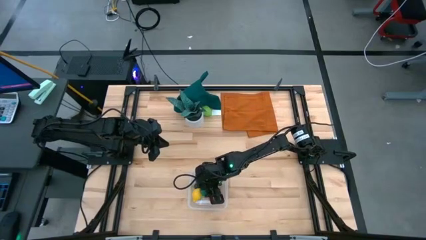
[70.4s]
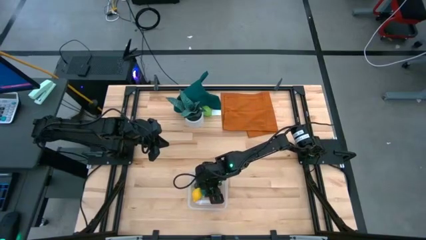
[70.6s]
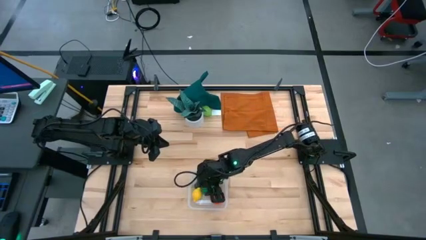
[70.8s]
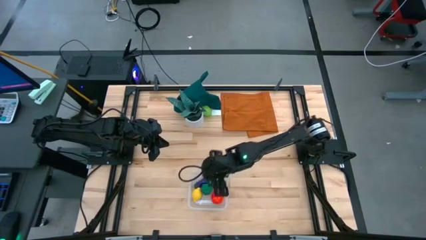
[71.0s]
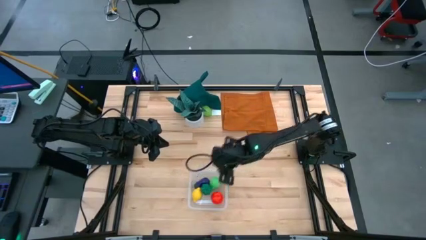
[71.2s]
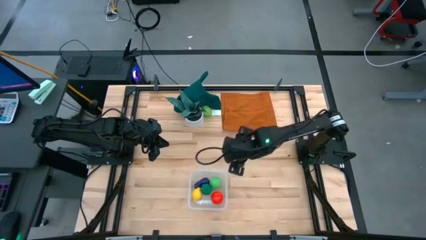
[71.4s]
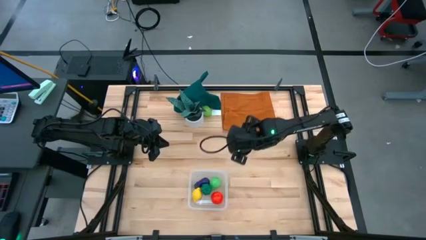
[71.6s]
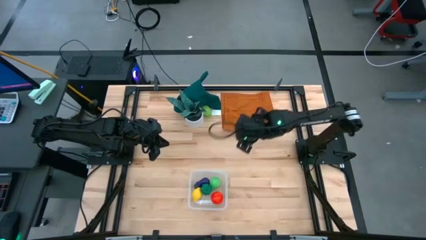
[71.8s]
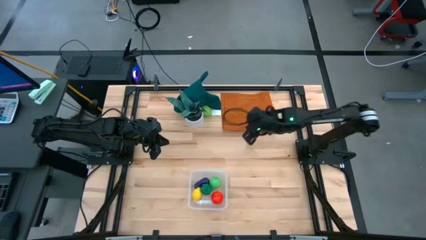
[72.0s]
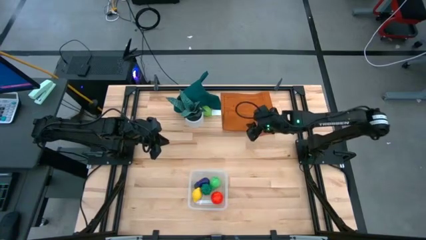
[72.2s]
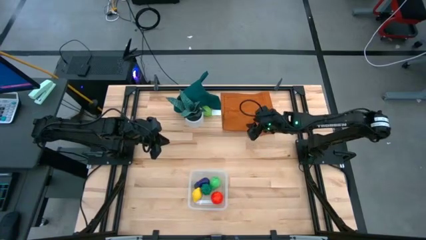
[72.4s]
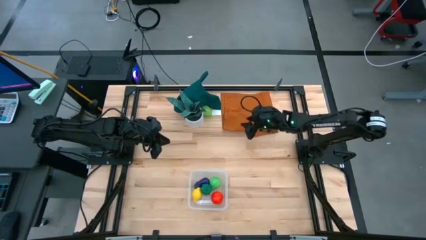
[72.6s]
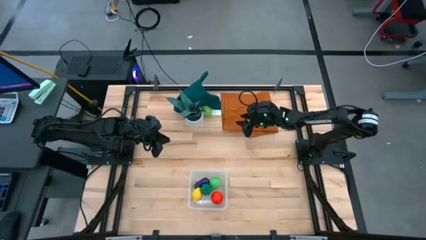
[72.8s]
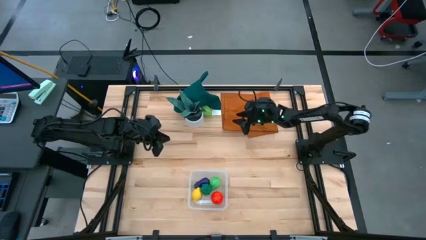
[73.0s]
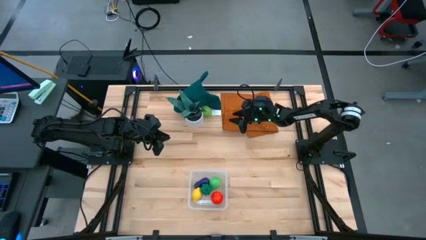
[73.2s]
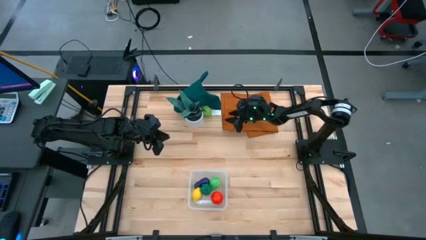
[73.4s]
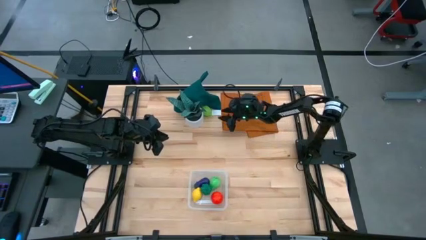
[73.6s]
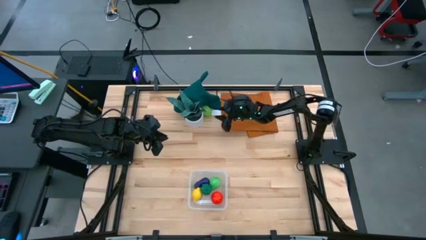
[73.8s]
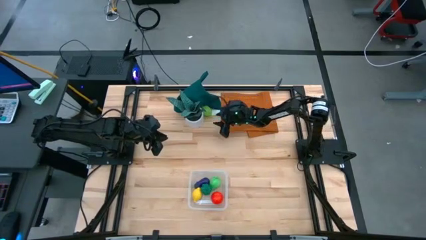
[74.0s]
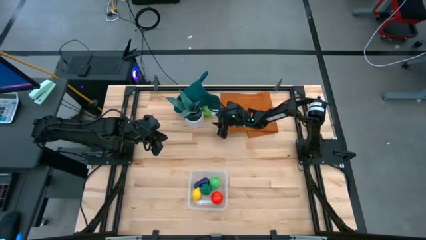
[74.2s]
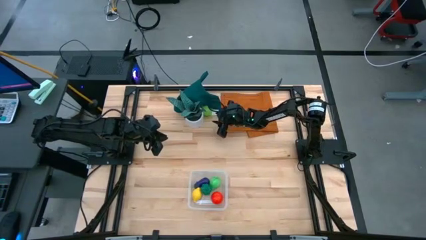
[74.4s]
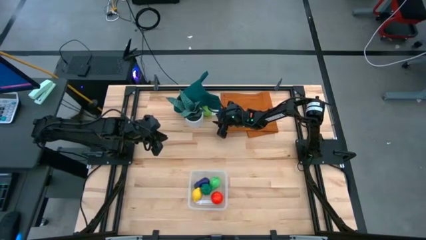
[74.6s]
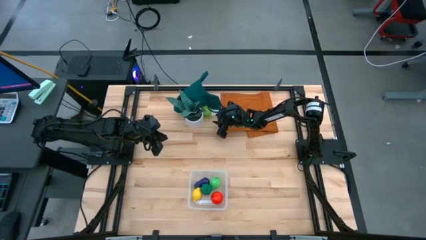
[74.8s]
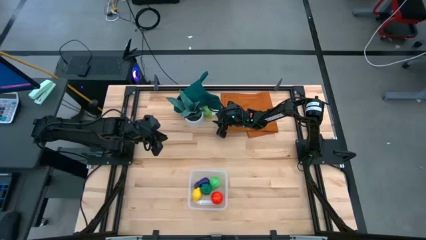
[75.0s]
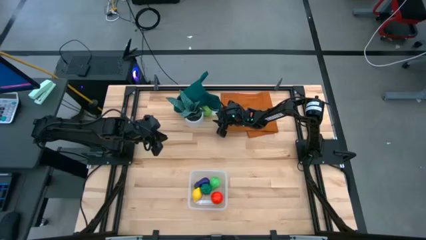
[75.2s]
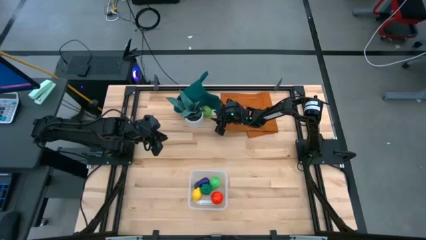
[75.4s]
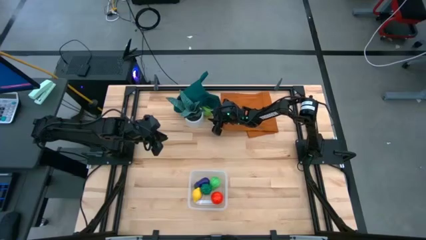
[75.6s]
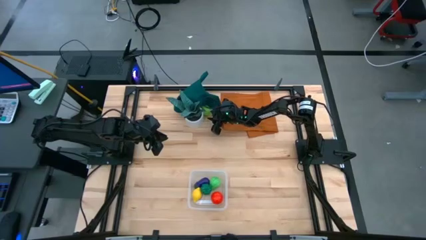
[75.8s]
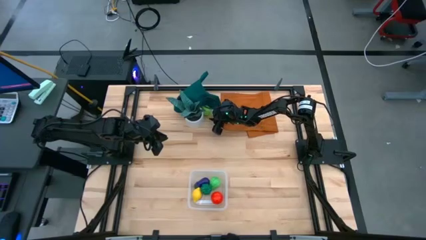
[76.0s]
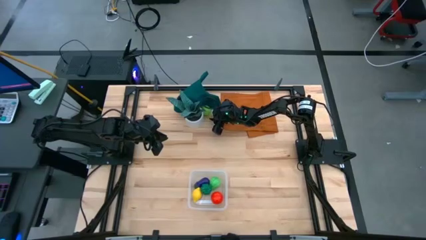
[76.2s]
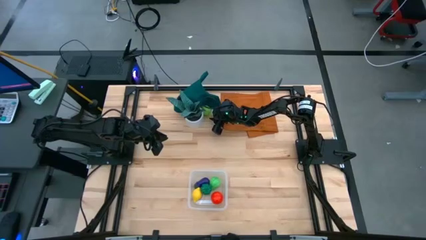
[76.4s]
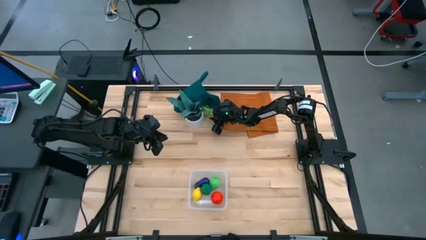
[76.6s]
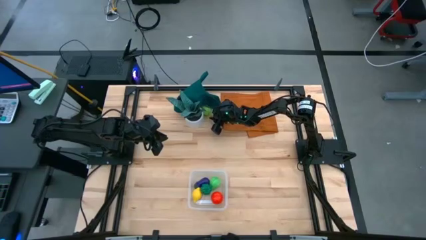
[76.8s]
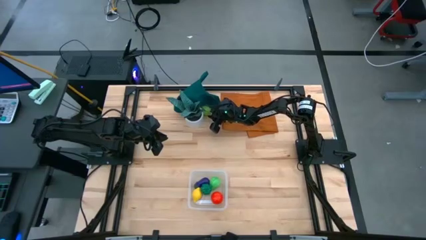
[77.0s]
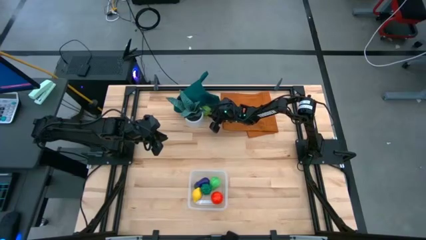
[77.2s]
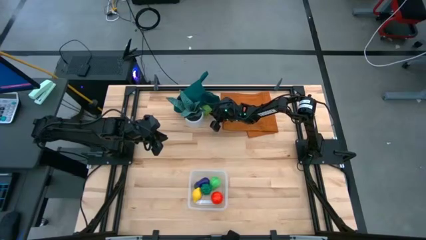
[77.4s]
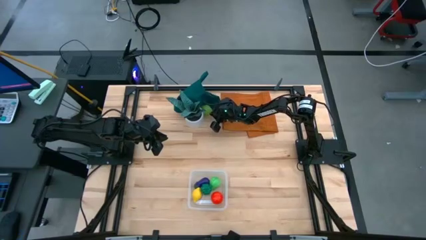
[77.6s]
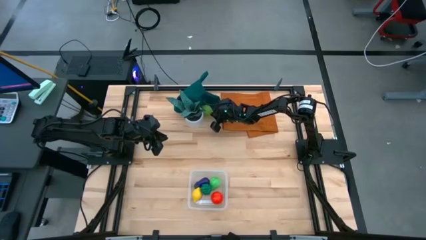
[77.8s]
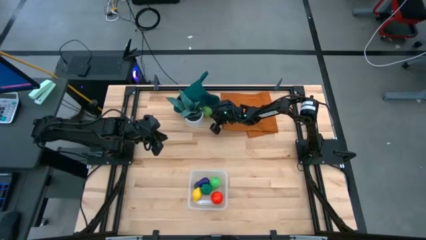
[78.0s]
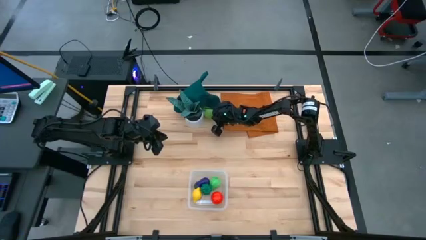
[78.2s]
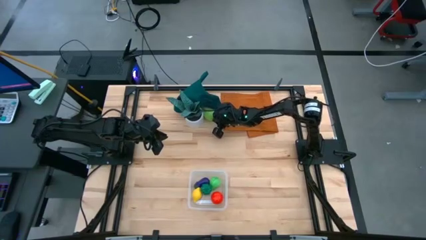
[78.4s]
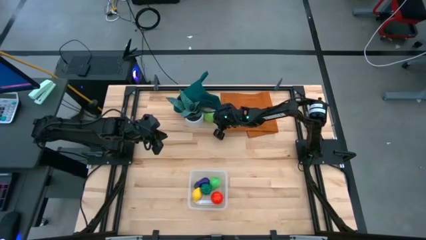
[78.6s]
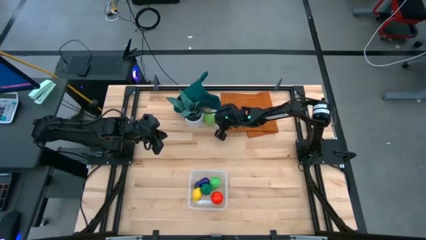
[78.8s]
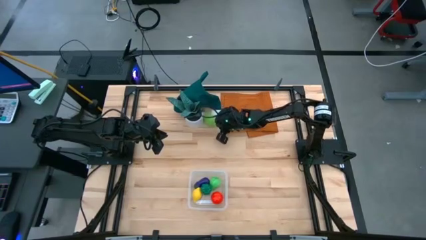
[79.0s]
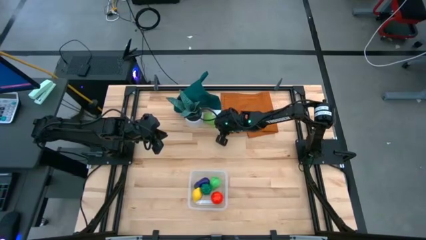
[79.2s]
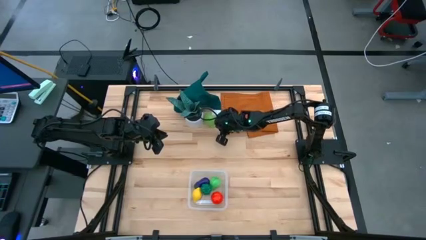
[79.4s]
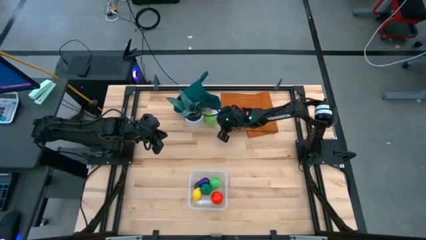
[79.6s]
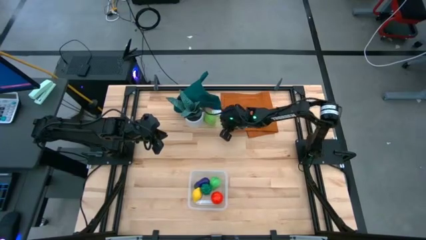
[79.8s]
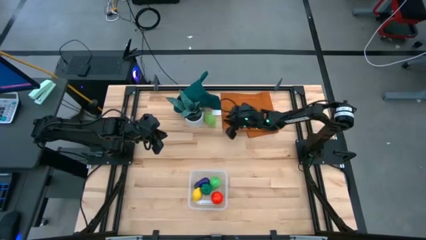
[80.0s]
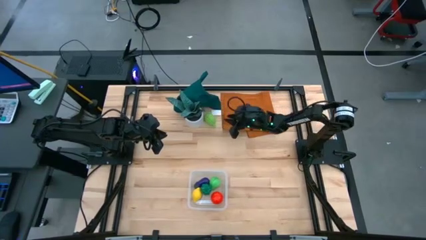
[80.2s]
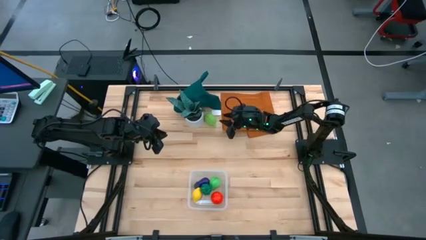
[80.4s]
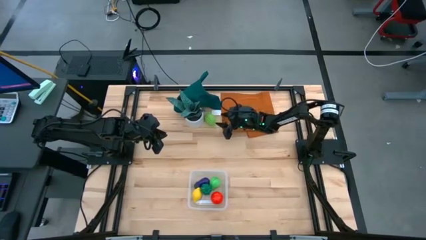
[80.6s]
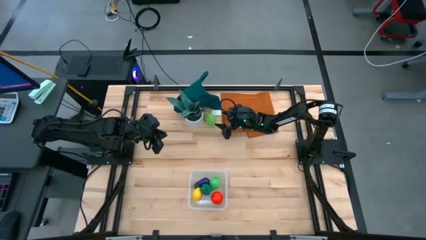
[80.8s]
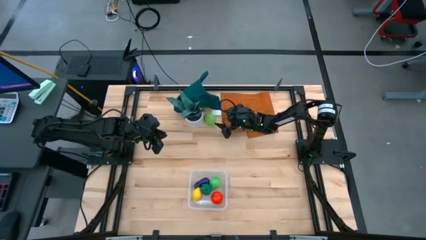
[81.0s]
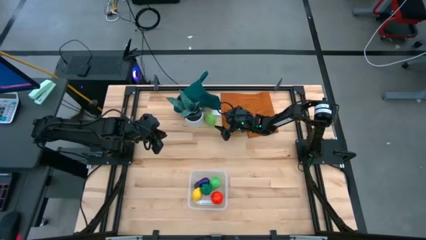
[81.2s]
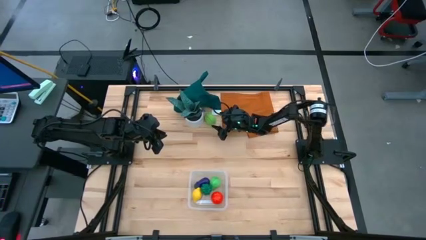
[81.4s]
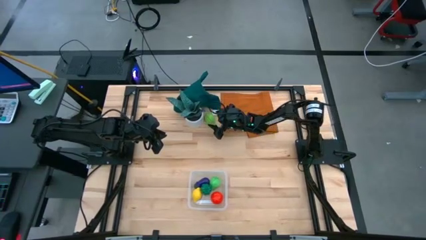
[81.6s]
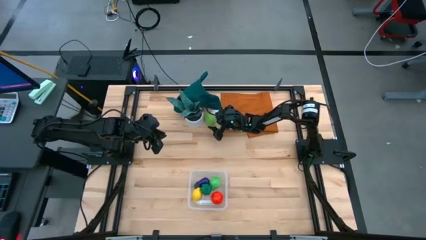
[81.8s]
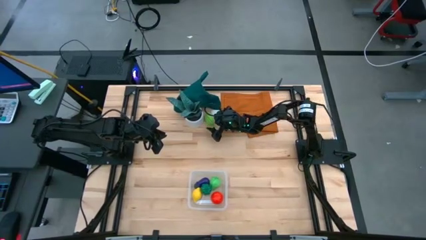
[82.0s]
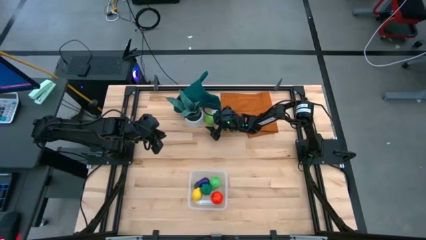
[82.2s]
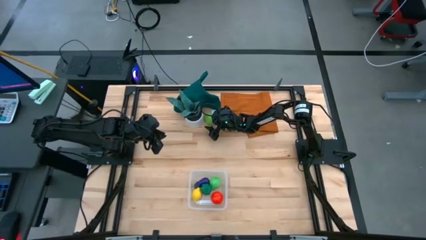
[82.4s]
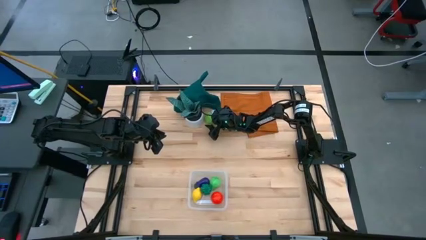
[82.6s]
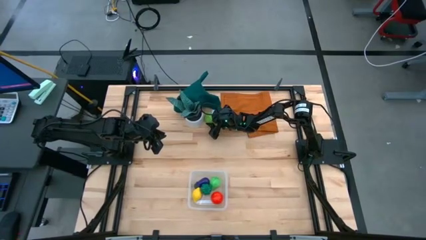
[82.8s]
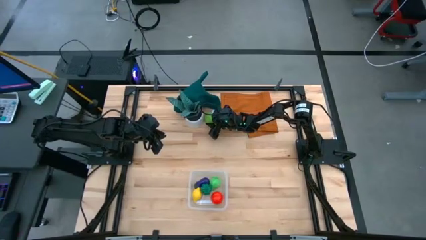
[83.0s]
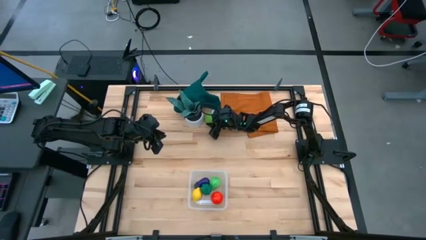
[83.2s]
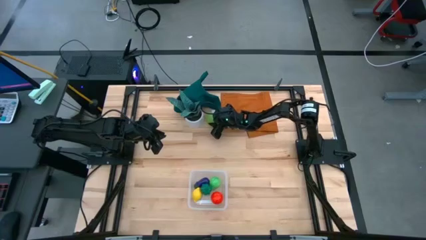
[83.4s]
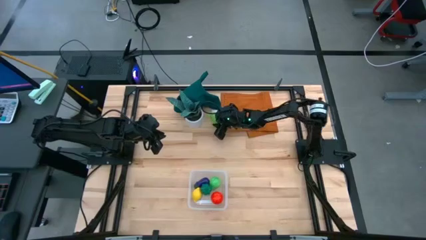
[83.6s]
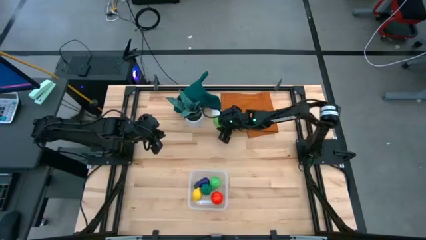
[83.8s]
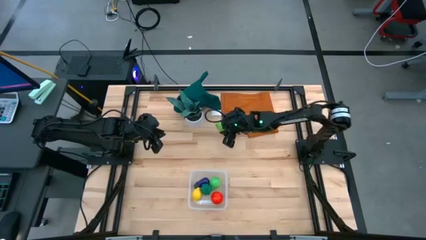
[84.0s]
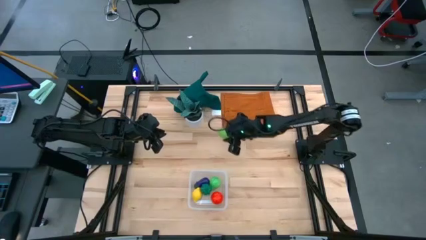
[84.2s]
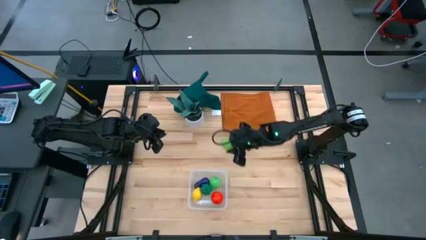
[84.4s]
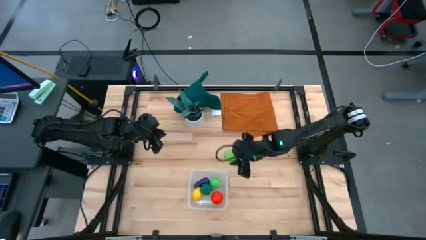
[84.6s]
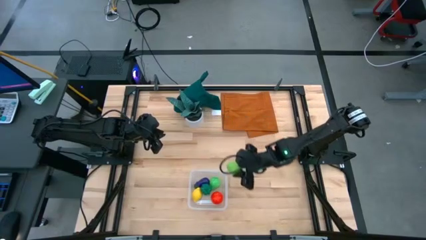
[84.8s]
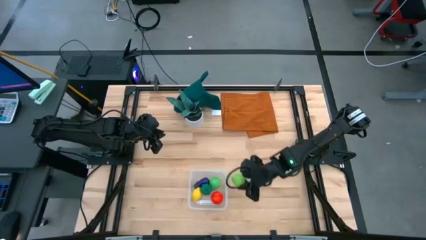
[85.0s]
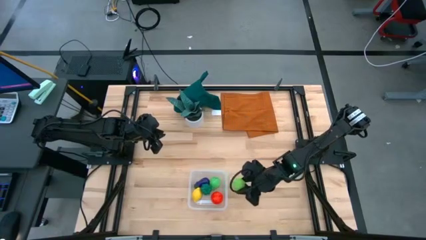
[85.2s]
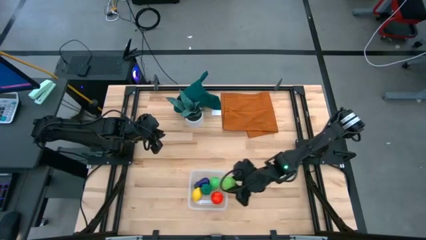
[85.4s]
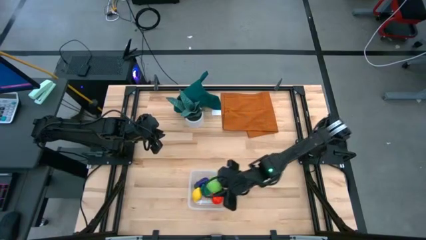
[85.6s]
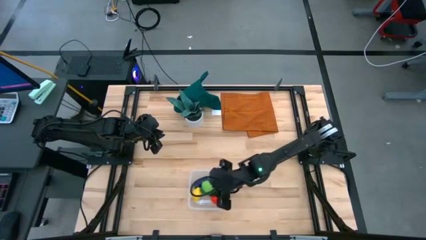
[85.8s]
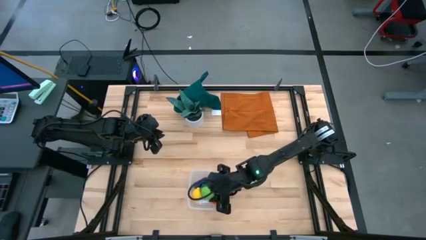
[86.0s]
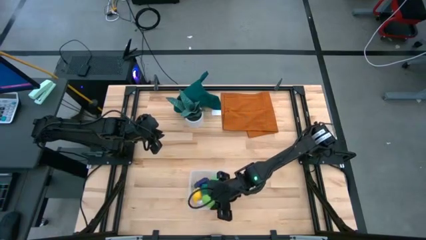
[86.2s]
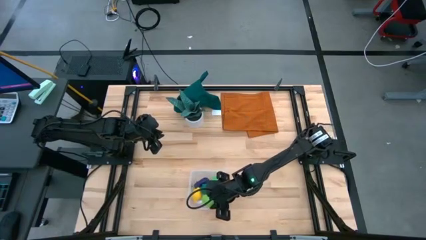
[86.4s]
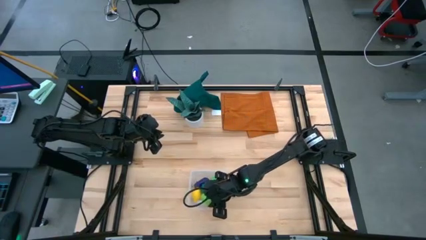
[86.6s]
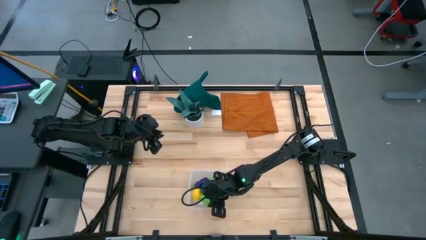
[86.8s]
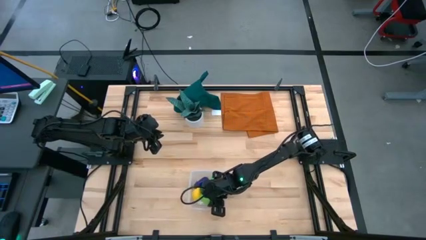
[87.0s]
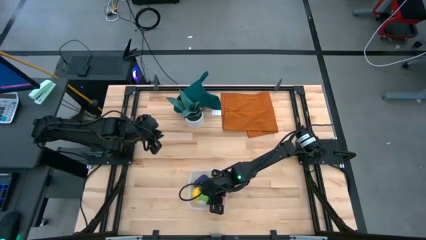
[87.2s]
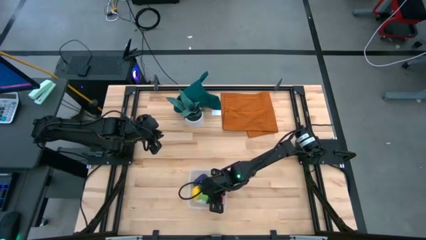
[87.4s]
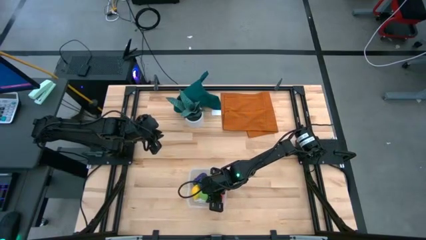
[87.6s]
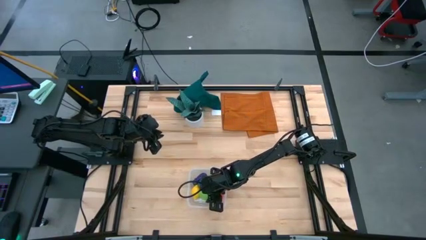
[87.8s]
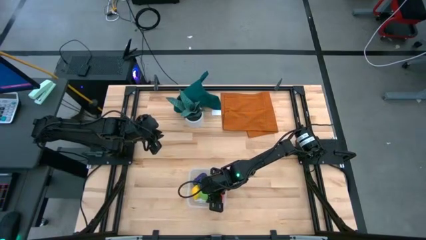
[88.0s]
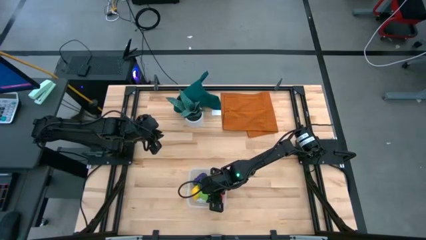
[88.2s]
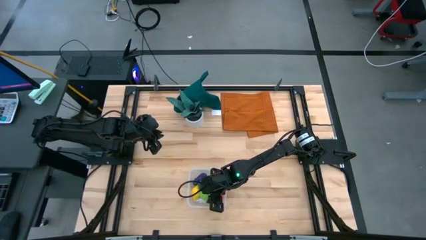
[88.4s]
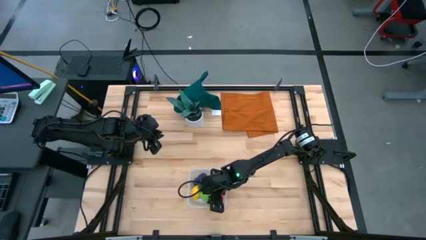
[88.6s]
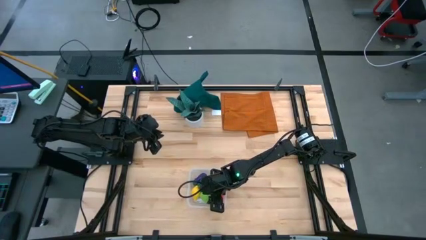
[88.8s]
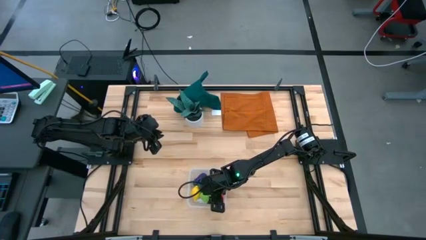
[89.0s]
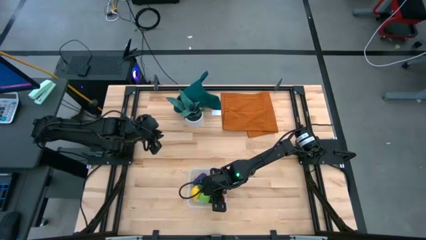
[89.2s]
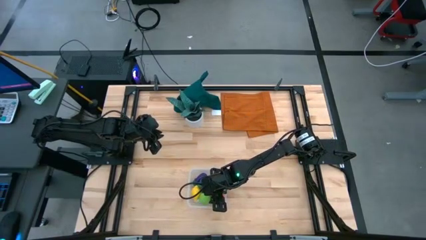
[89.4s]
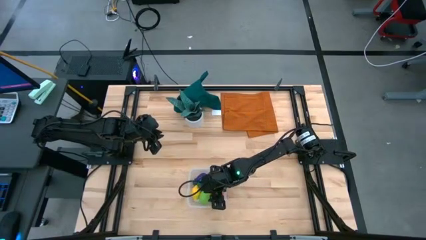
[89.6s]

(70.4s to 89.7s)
Task: Pick and placing Produce into tupperware
Put the melon into the transparent bin
